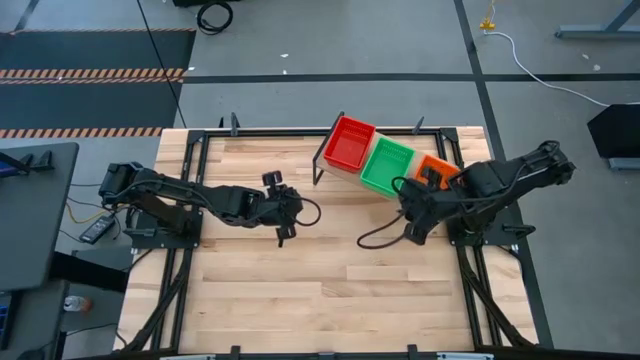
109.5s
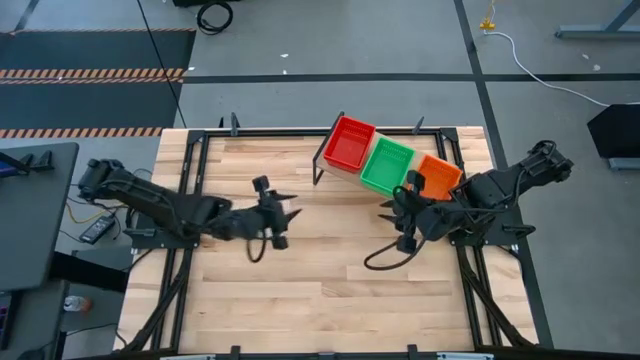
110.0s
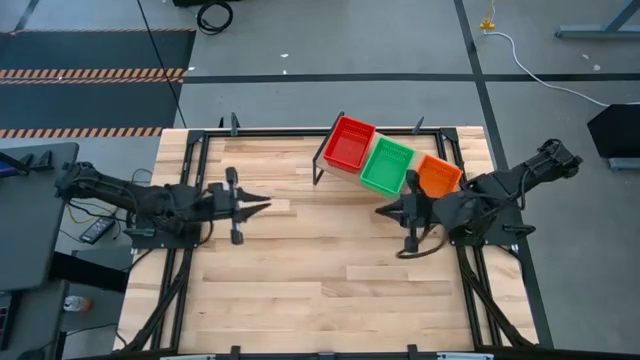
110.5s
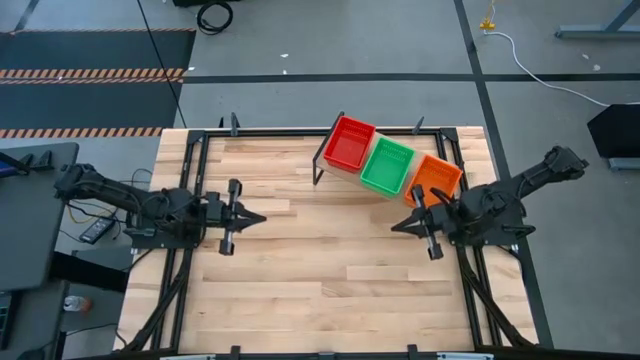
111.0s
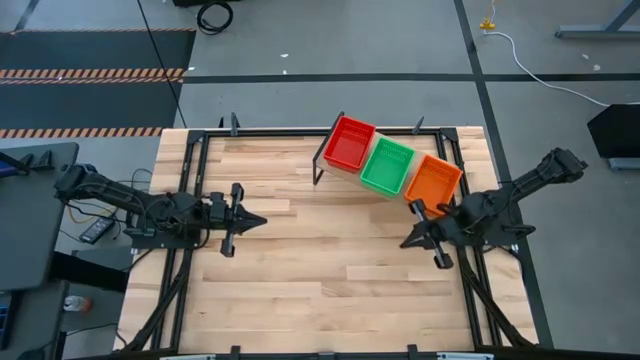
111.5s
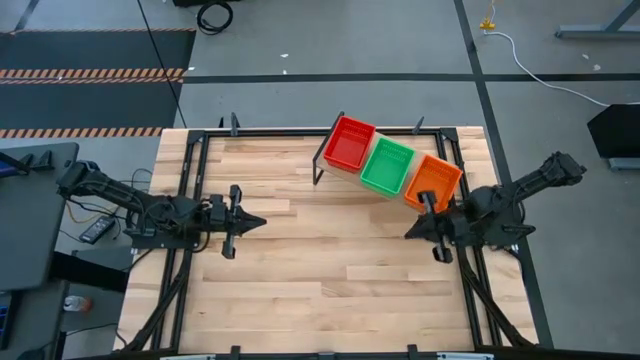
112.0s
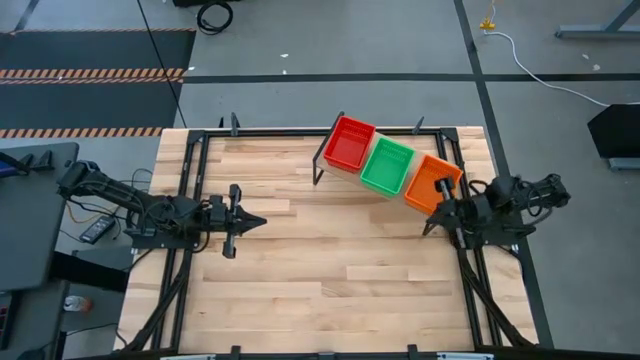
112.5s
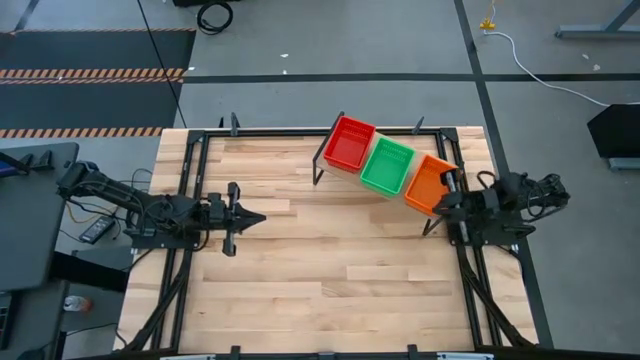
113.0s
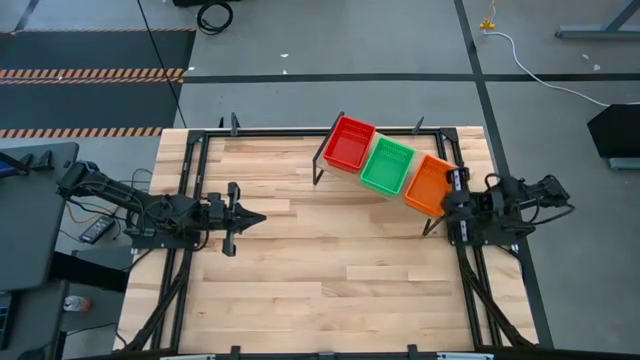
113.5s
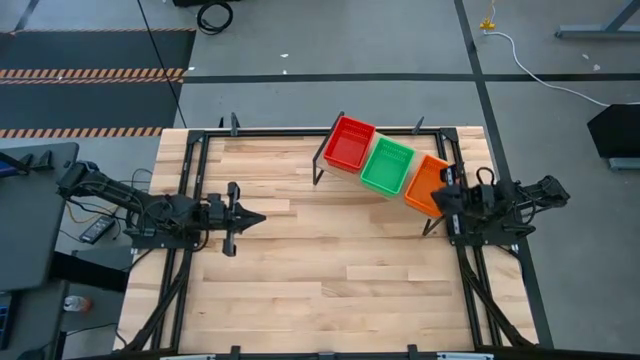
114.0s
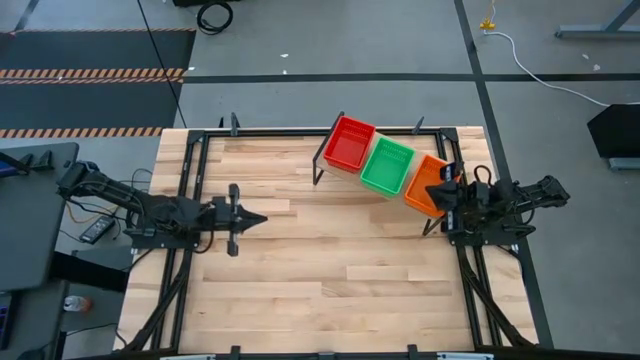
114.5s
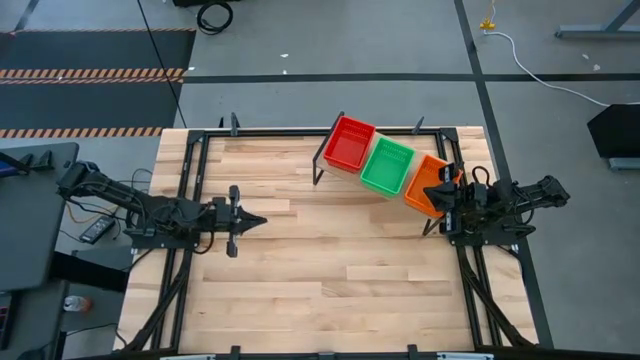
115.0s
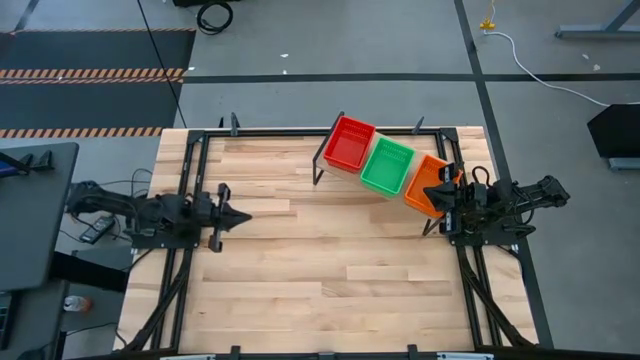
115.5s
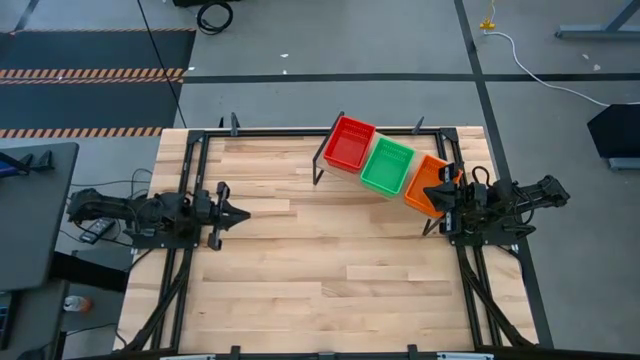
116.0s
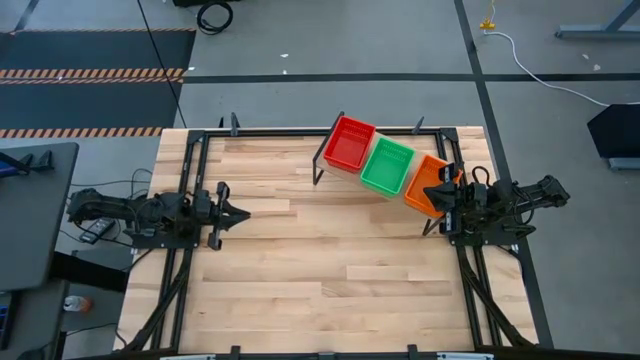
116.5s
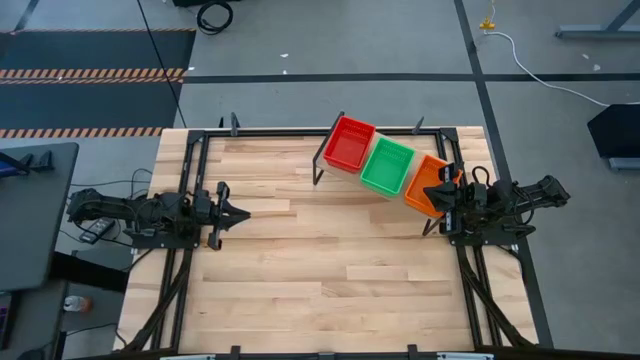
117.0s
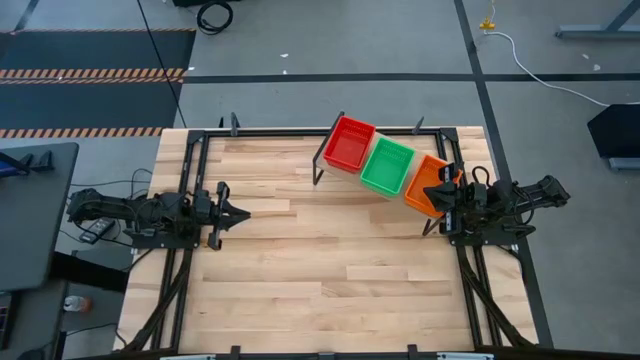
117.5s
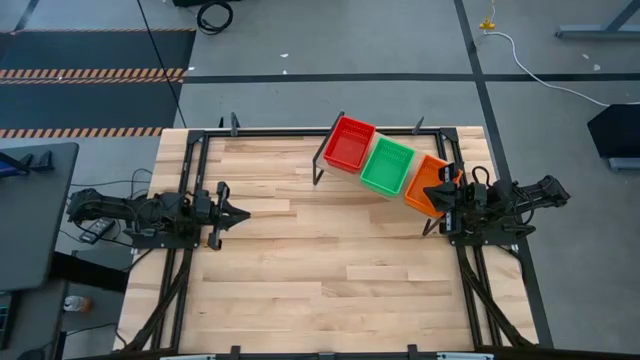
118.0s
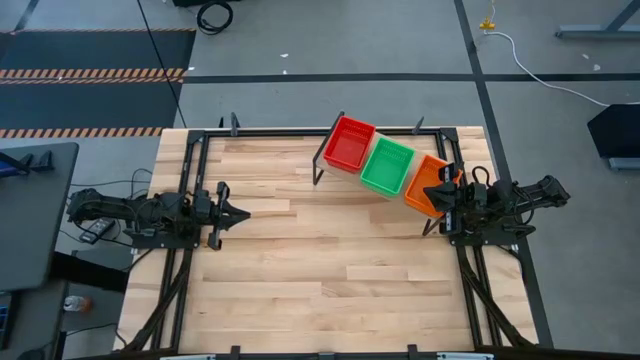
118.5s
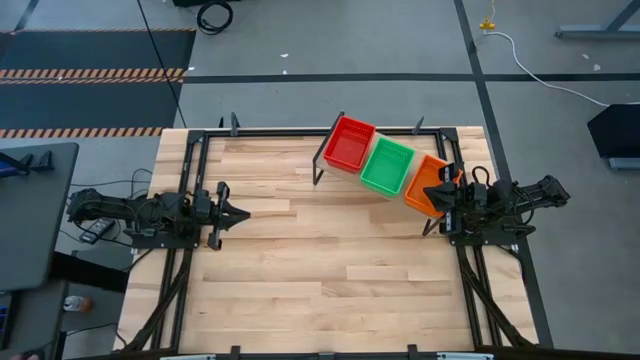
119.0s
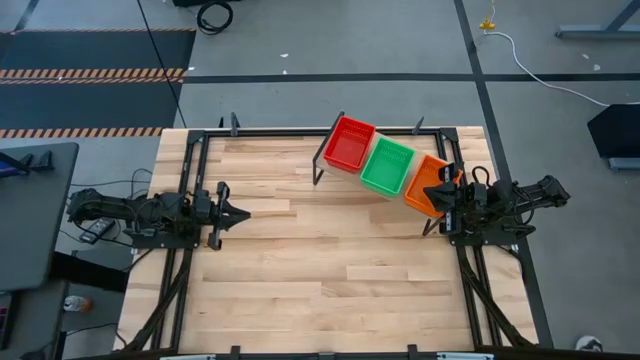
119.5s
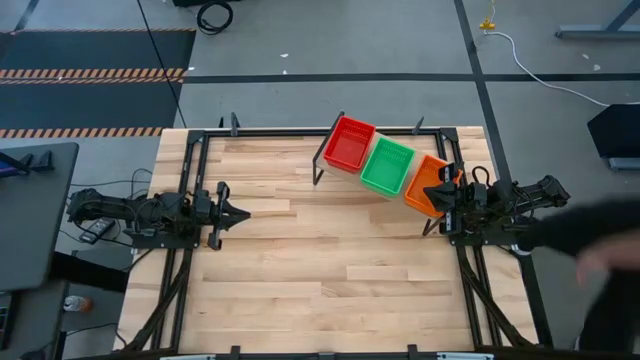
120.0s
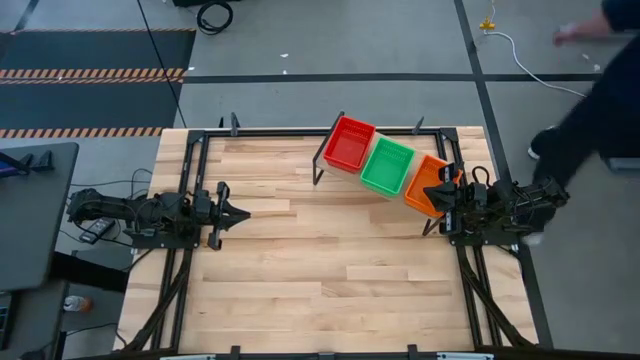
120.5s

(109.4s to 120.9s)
Task: Stack baskets on shelf by color
Return to Home Position

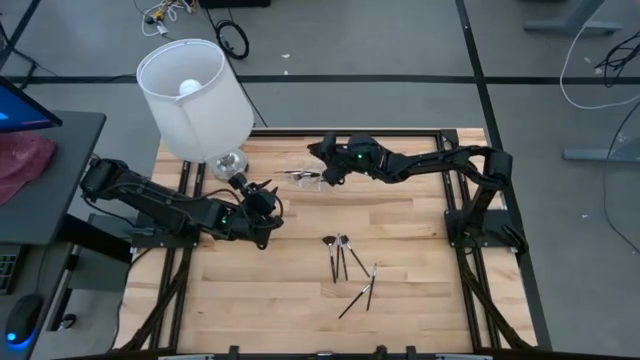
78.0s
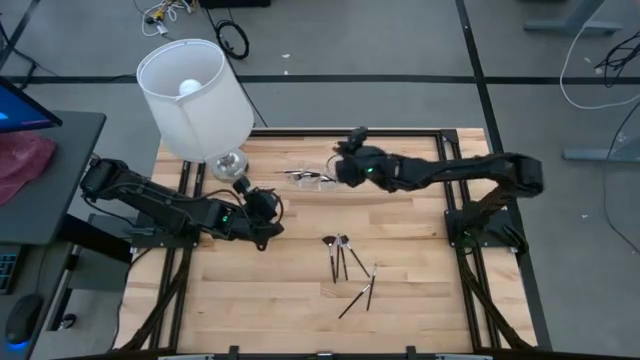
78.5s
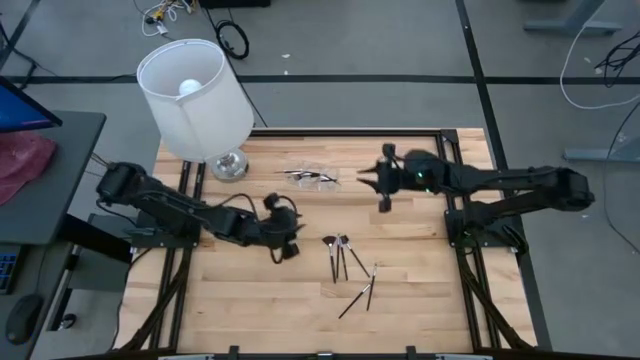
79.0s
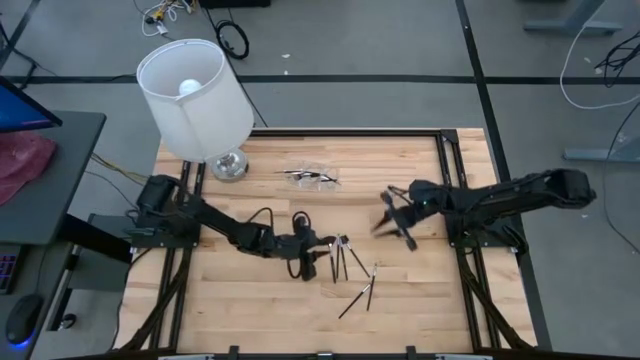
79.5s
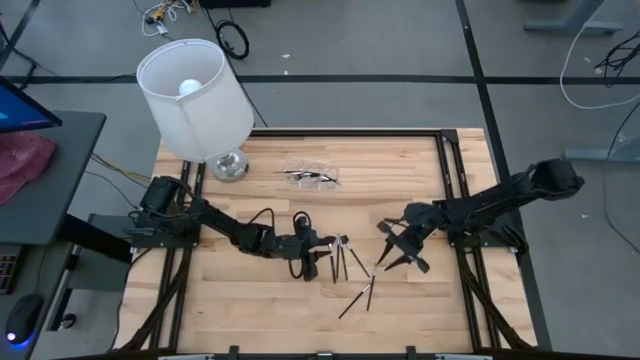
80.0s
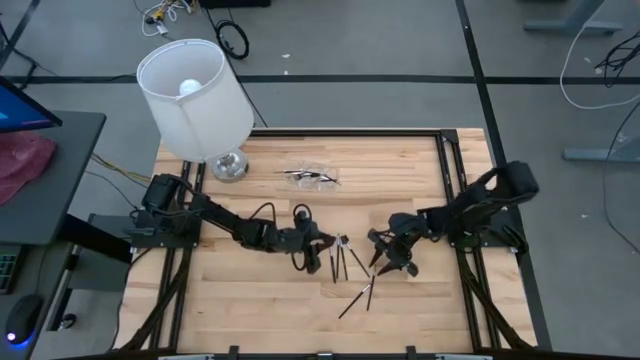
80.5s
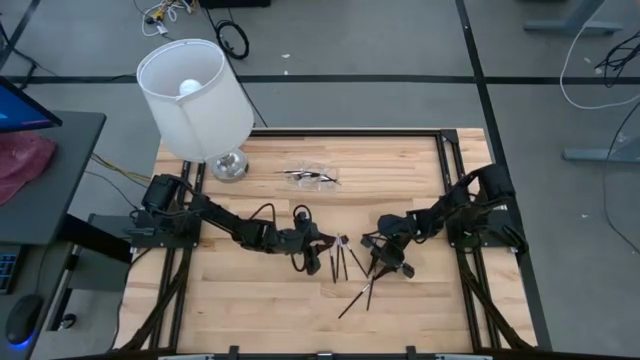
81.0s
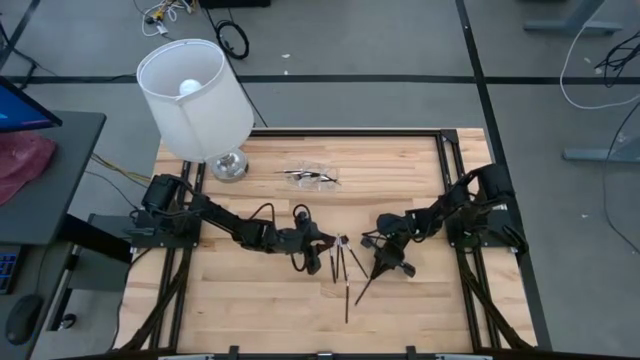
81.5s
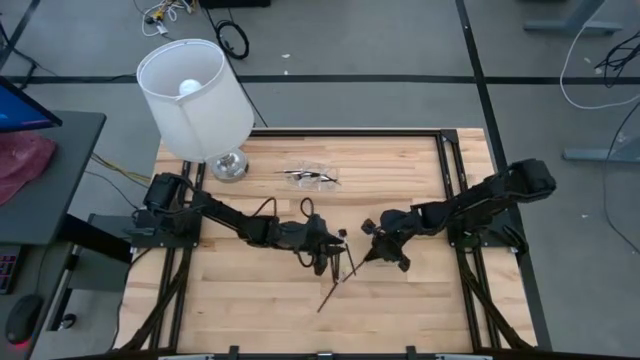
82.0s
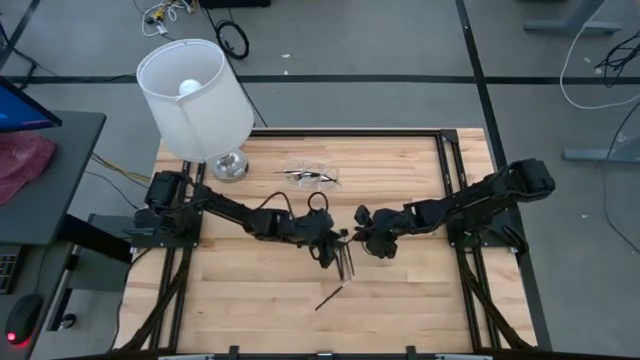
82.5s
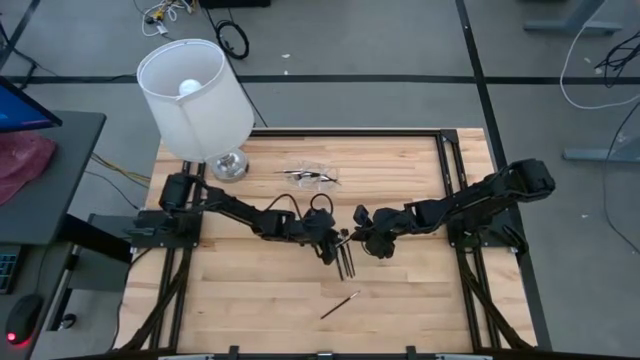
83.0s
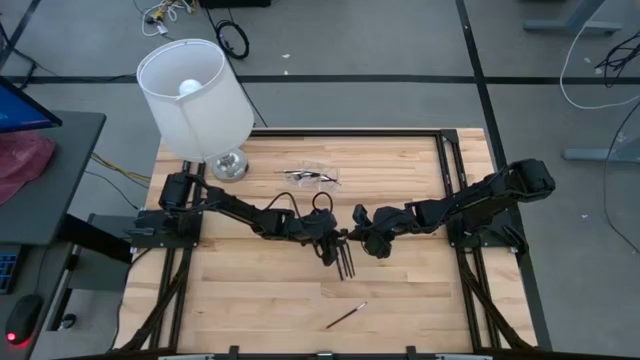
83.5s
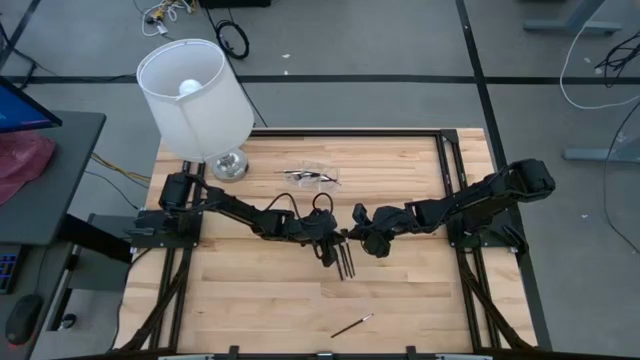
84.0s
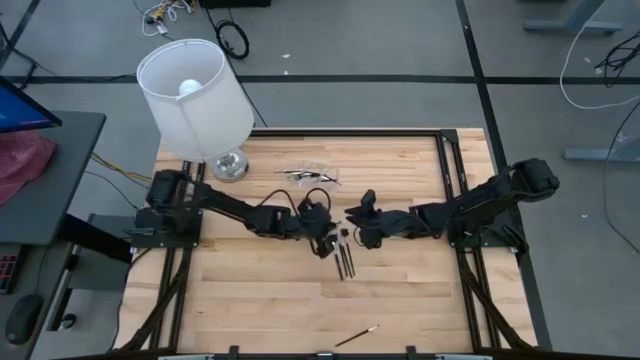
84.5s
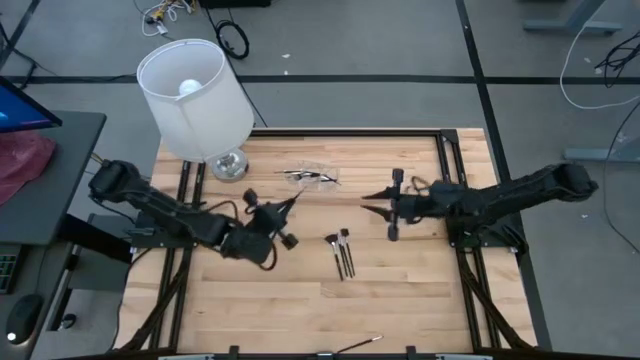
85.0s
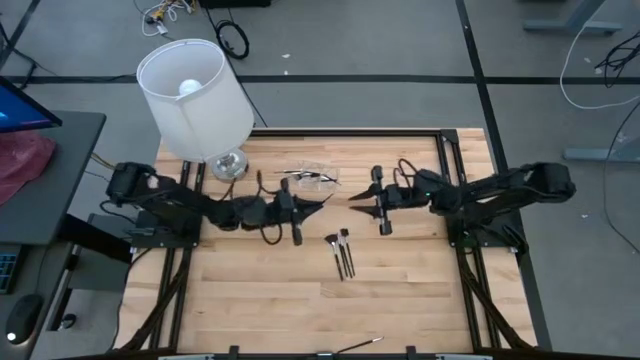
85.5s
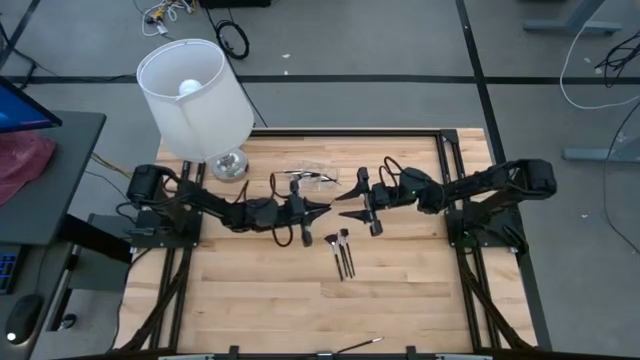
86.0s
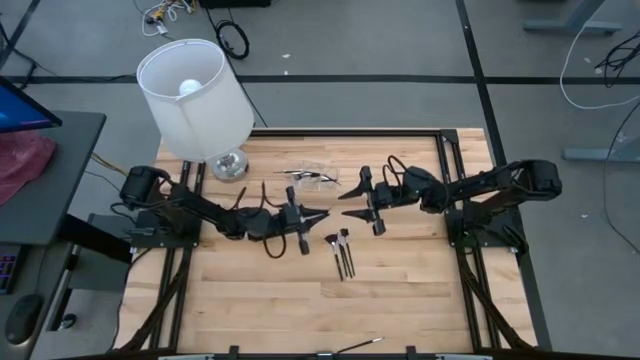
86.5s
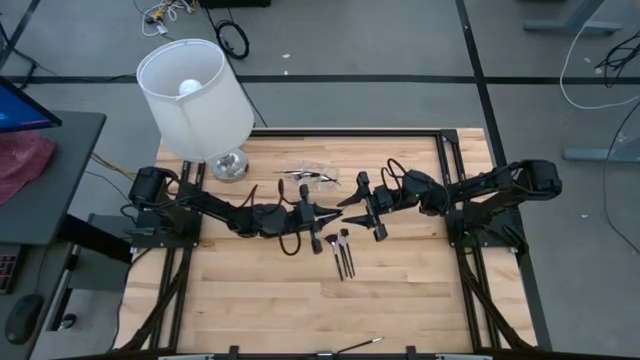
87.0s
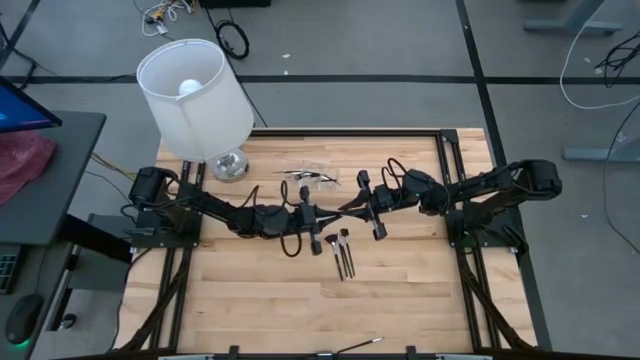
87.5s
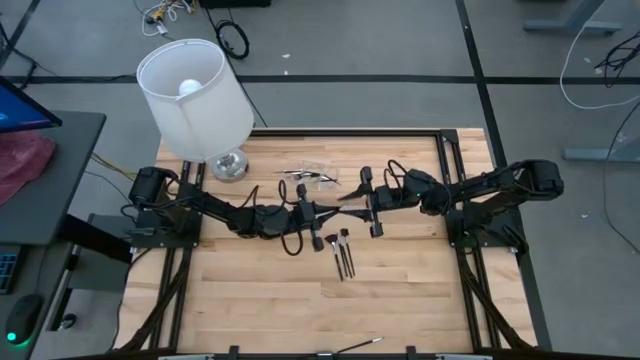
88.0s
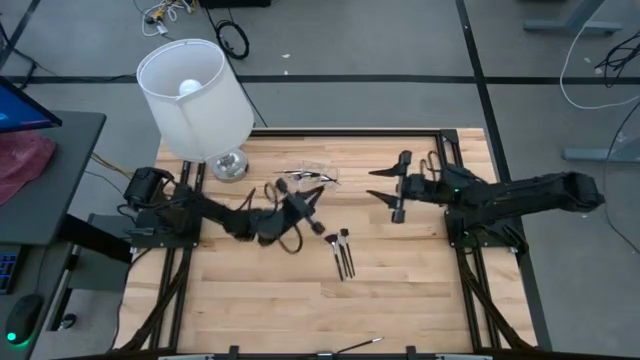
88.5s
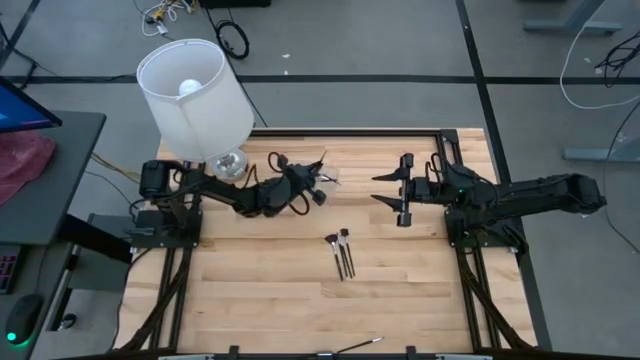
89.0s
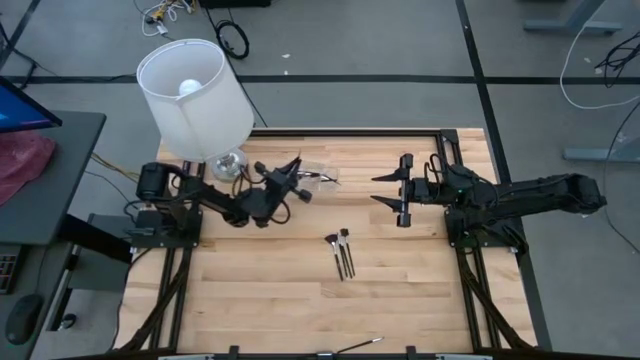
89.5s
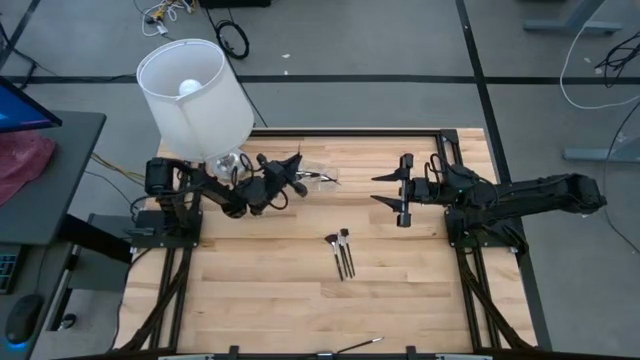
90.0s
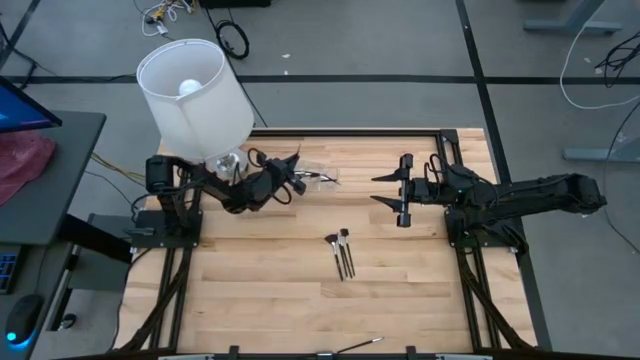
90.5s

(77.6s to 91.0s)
Task: Put items in baskets/containers
Put the black eyeliner brush into the transparent organizer
